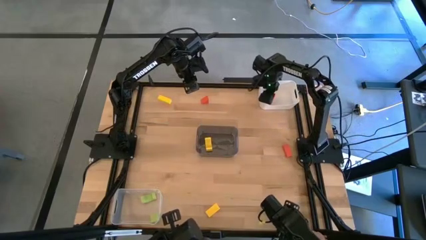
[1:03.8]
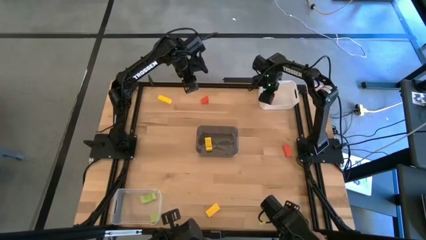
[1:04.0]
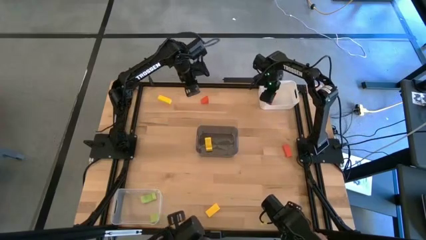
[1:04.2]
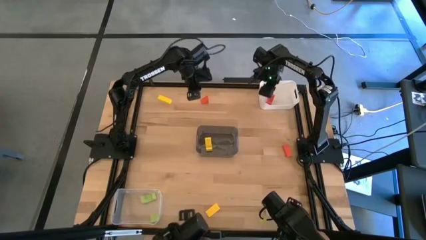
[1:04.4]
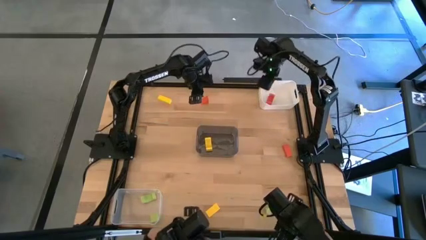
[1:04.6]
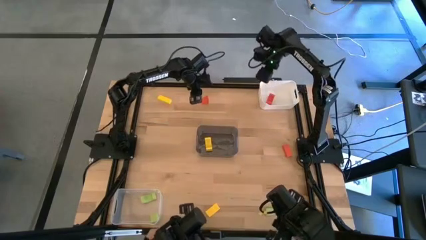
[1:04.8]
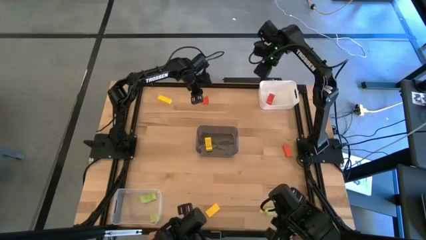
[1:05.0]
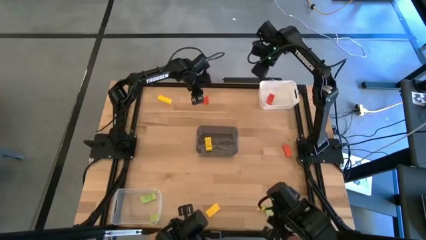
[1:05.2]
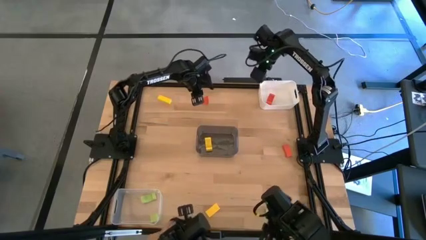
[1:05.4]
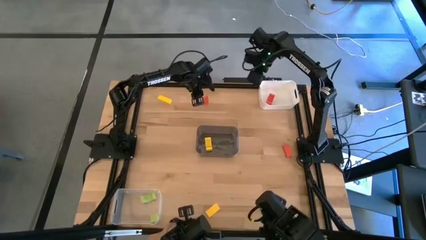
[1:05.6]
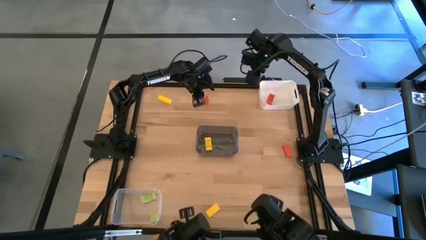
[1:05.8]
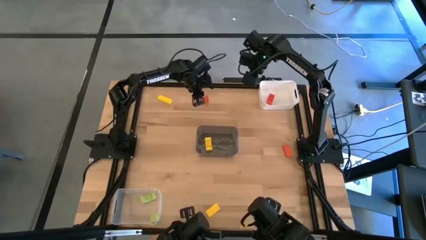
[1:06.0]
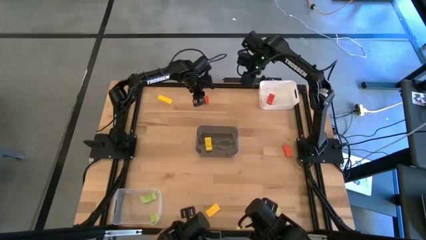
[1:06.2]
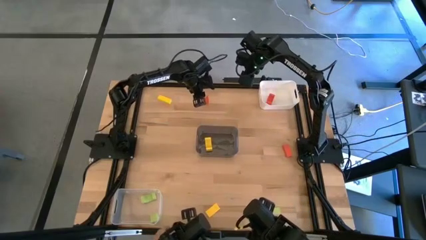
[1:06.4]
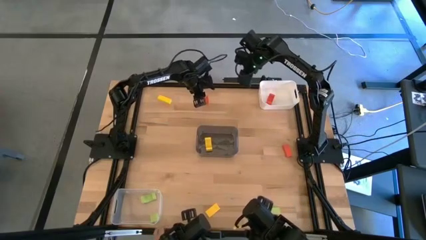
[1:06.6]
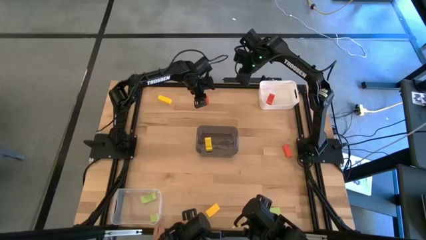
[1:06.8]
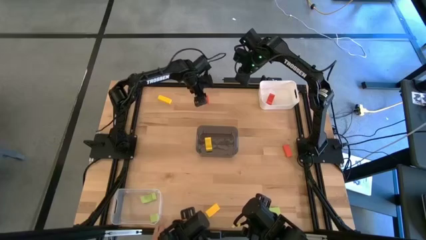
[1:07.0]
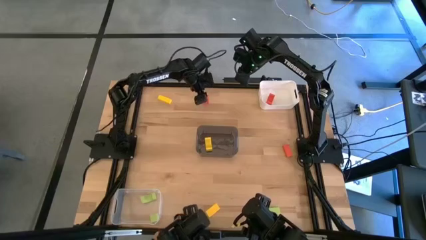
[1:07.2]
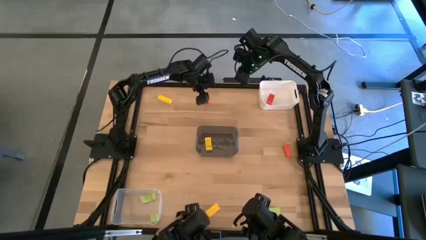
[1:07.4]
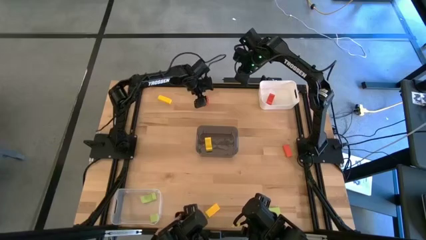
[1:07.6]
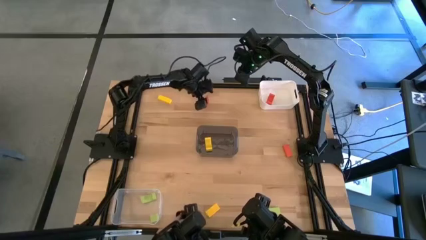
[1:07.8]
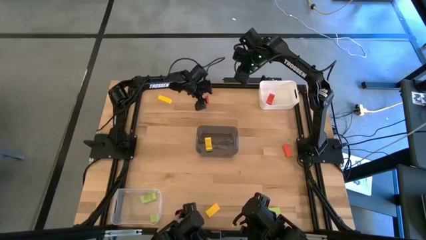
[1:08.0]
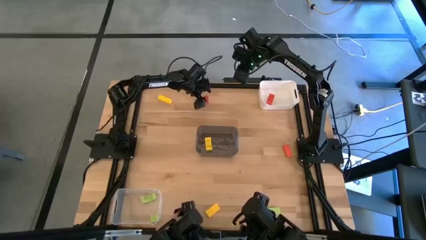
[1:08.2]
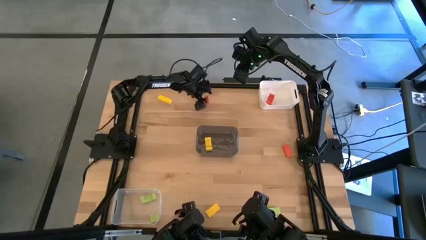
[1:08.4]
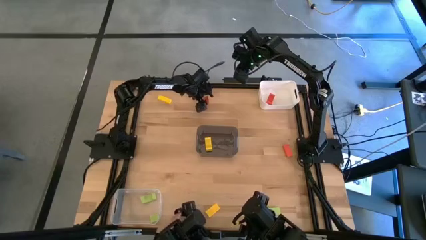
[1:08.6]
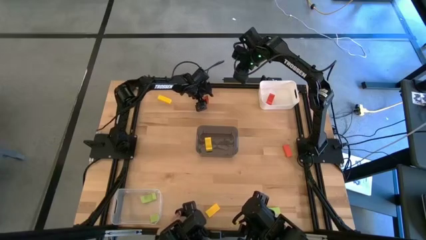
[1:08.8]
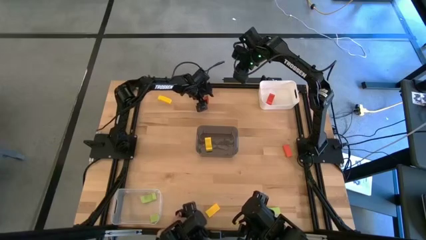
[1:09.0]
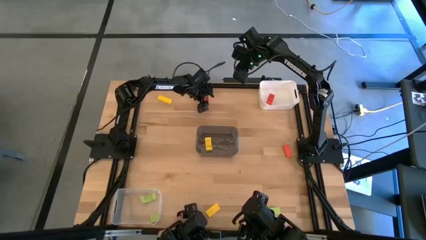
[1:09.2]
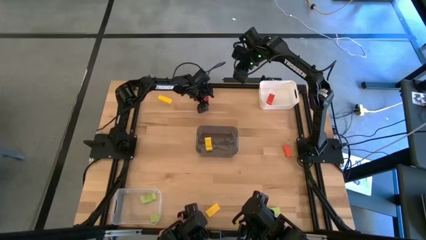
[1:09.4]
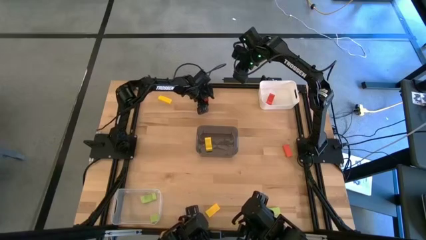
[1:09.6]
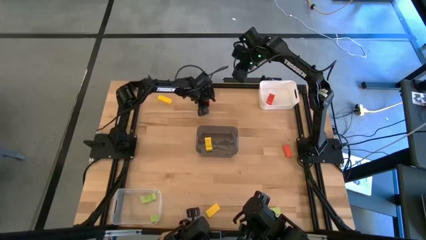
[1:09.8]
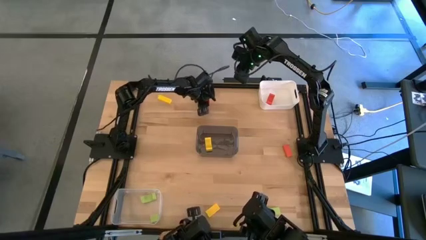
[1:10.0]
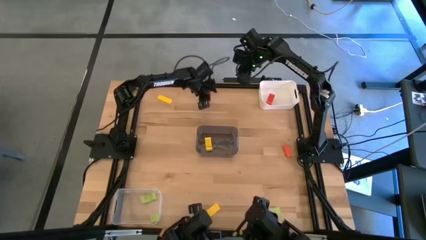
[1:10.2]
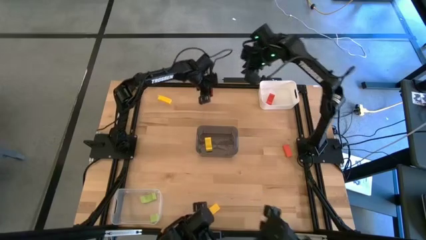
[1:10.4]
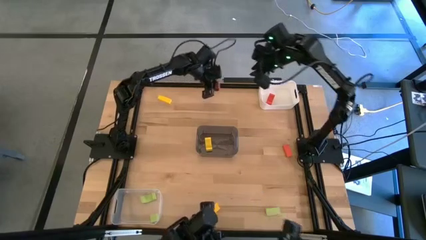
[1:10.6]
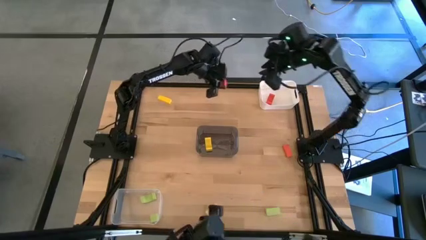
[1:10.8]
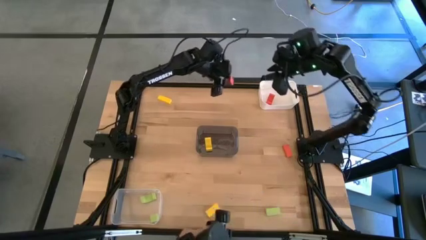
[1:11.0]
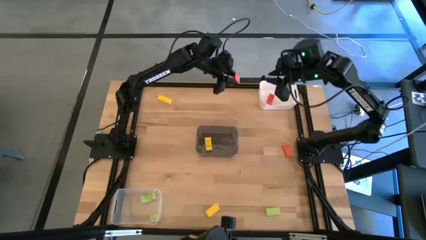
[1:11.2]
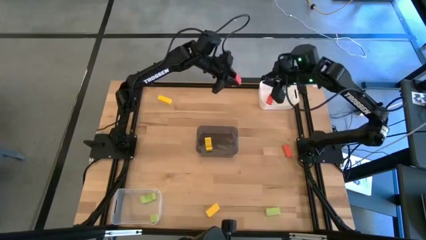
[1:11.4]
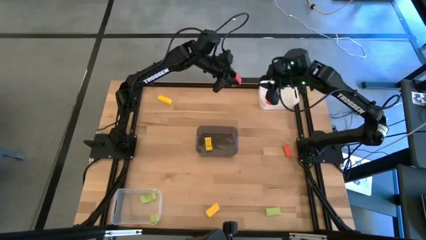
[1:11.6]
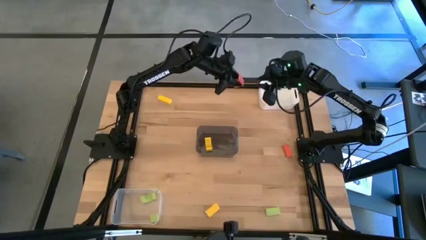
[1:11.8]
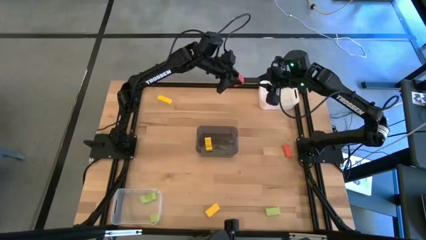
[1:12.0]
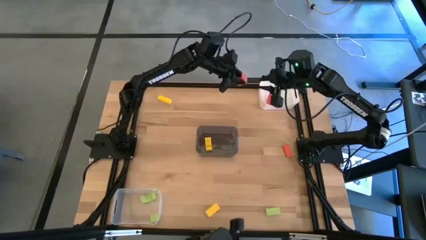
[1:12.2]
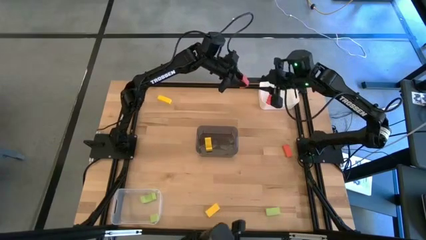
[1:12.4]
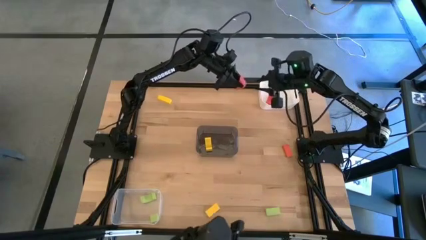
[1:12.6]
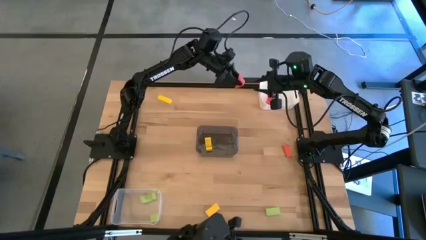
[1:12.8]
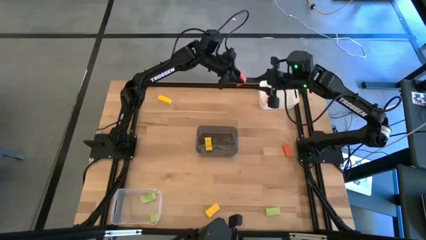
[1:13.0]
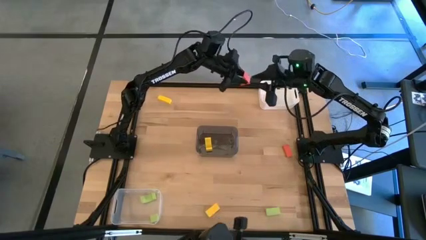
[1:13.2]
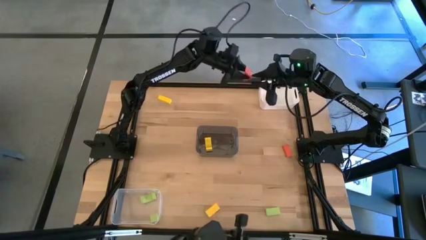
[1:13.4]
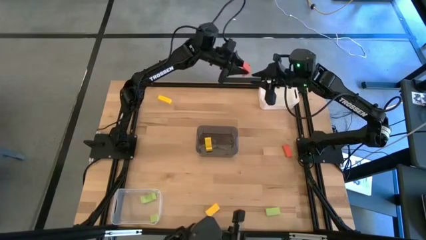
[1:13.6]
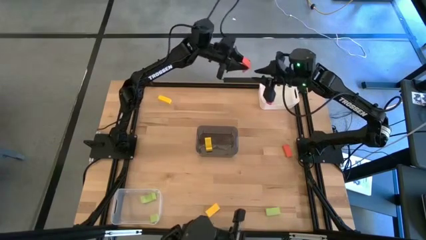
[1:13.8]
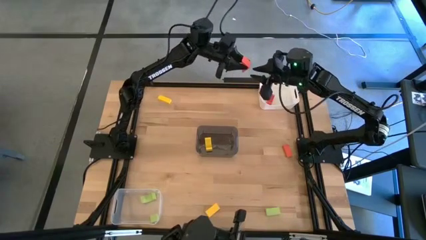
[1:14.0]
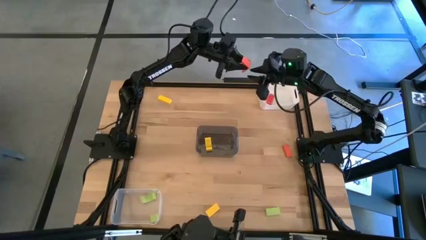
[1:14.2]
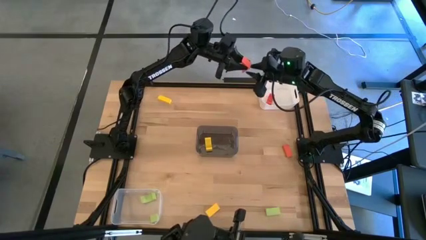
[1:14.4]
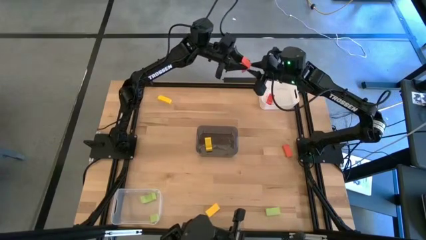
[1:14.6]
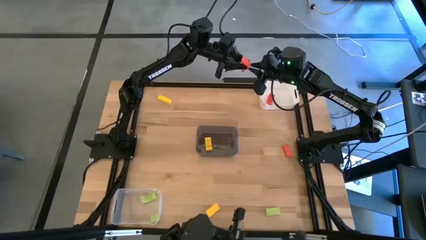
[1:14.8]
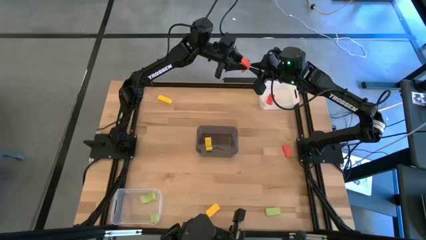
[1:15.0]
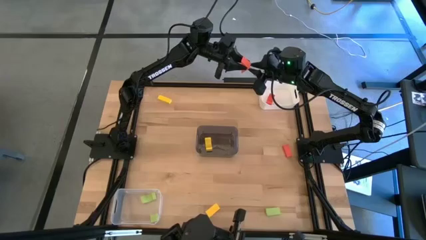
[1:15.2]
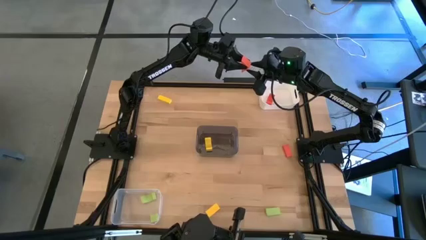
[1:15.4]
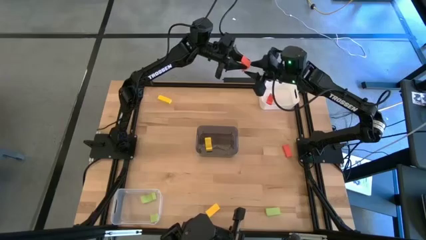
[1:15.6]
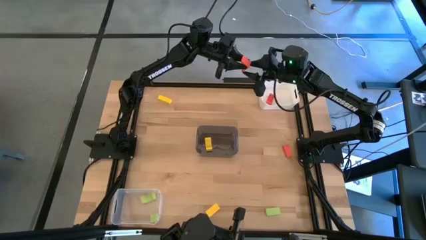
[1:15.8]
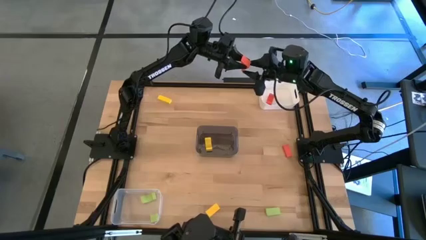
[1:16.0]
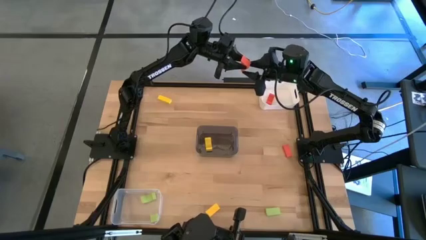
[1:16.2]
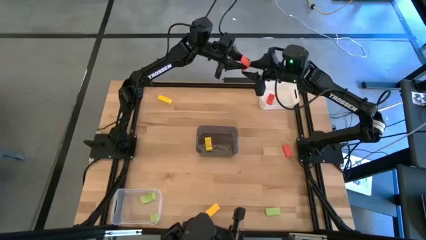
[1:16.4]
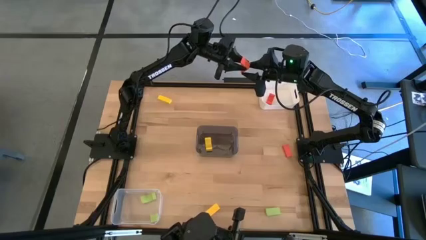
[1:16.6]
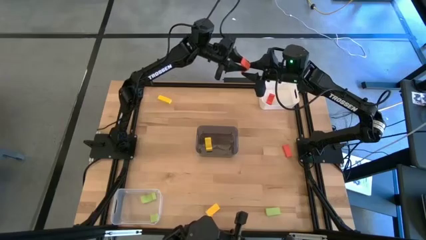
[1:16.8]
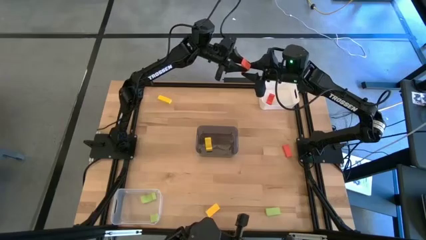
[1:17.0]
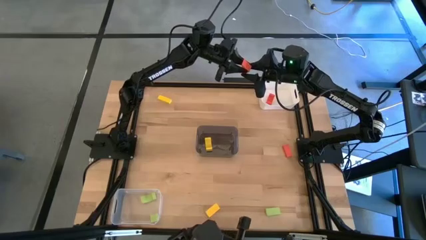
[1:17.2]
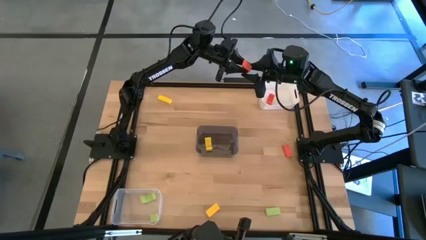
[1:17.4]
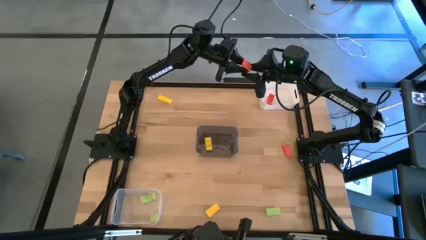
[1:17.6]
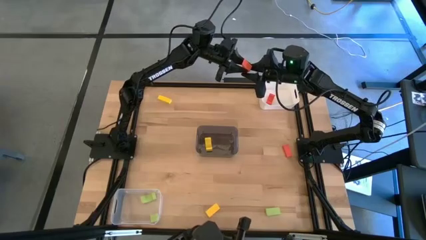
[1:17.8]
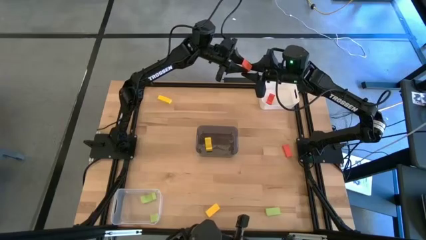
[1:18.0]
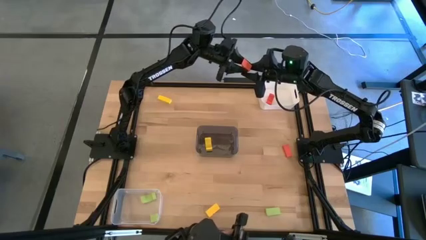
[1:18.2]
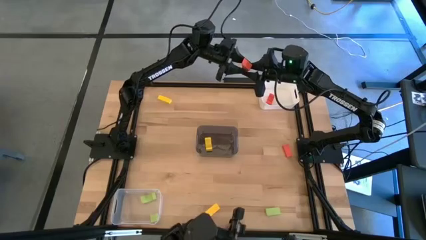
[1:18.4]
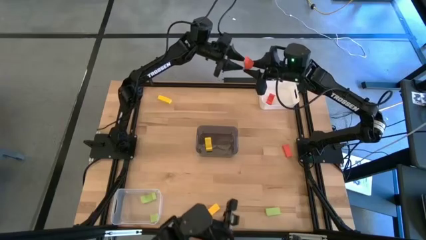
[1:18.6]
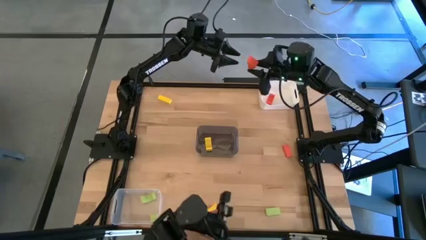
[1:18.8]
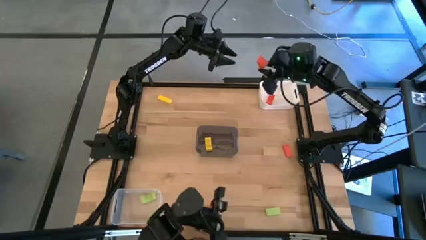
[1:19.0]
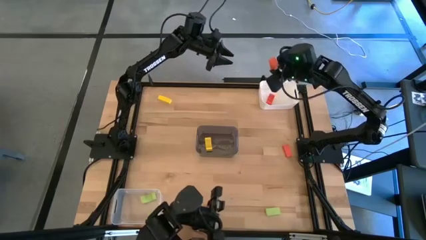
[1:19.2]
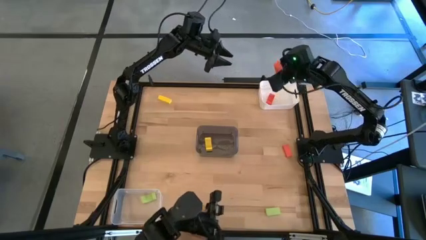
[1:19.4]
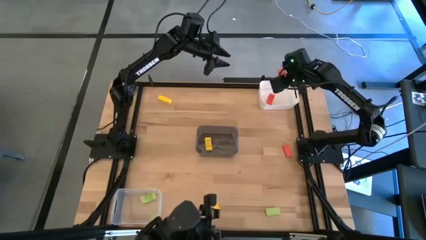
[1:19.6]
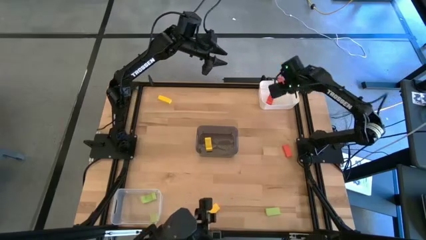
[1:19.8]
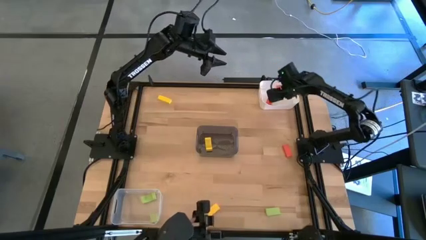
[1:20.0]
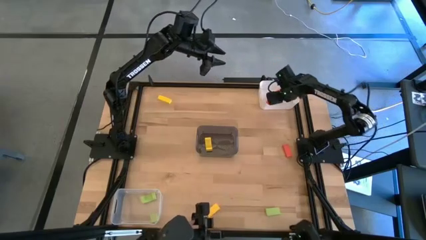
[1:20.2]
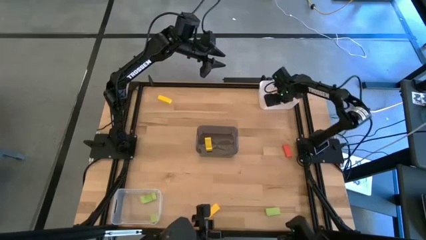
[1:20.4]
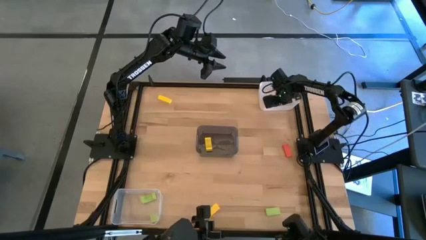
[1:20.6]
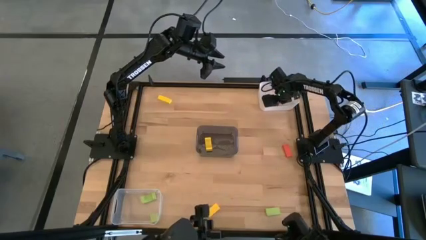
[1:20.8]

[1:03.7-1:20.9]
Task: Sort & place blocks by color
Put the top orange block into the white bin
